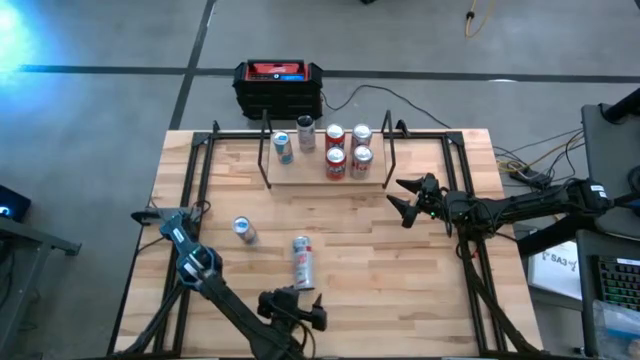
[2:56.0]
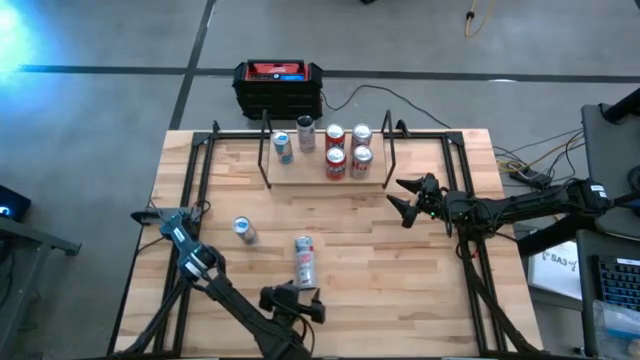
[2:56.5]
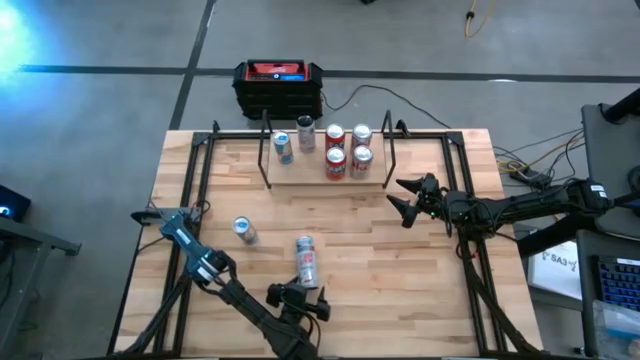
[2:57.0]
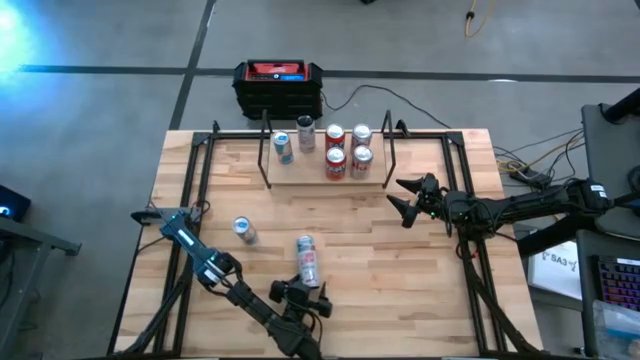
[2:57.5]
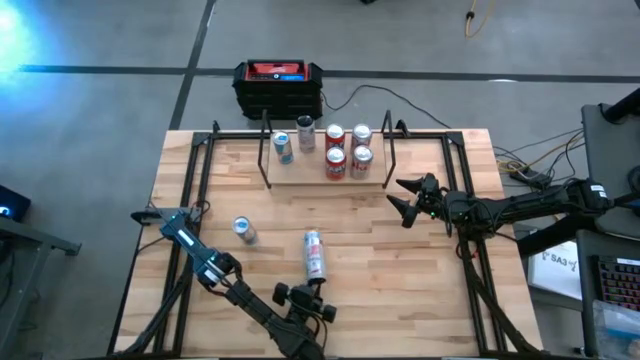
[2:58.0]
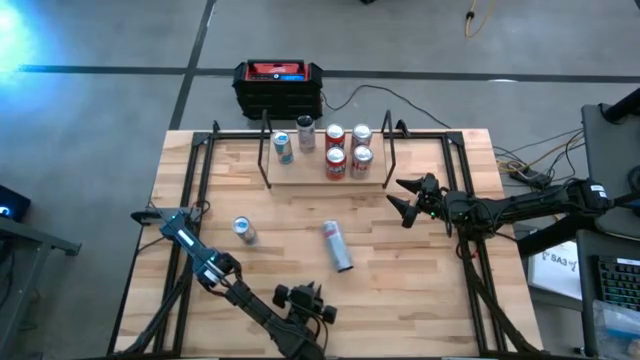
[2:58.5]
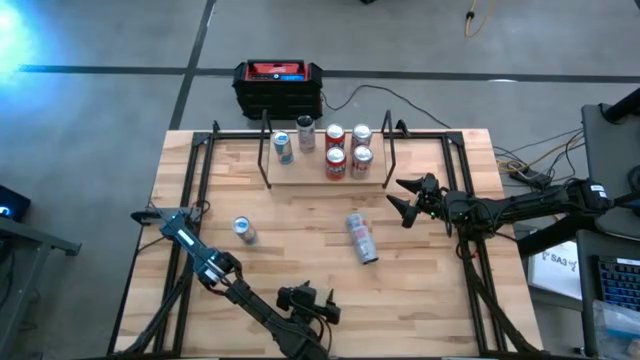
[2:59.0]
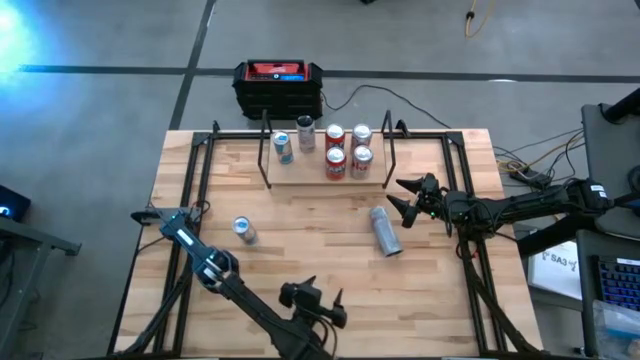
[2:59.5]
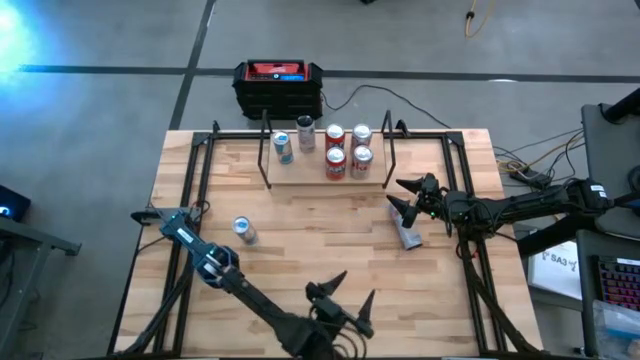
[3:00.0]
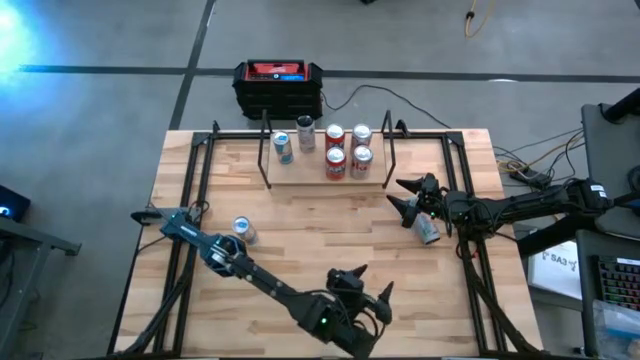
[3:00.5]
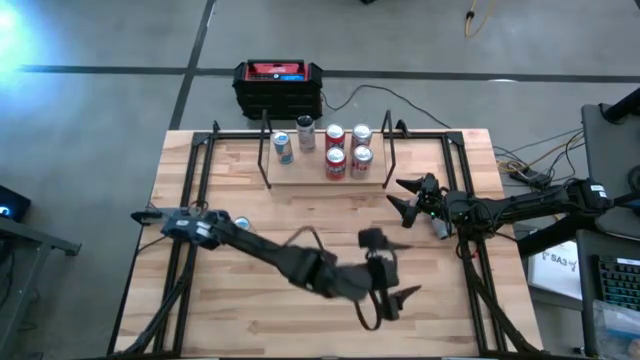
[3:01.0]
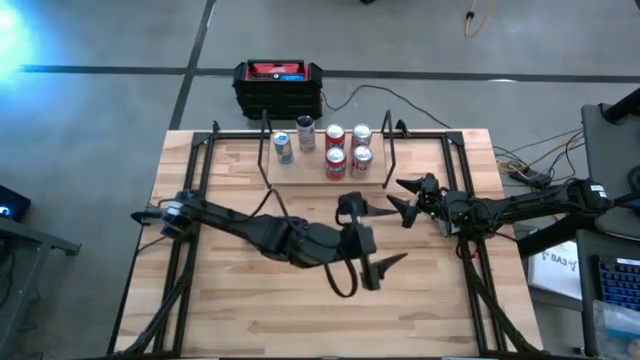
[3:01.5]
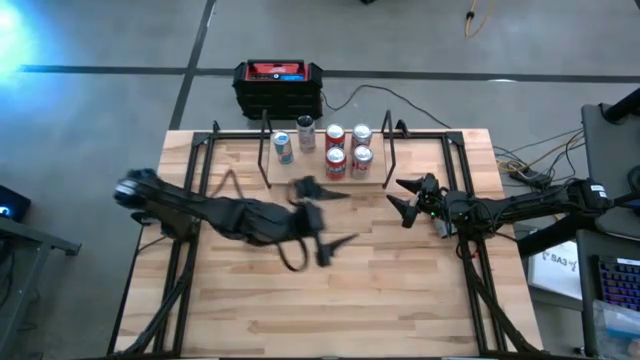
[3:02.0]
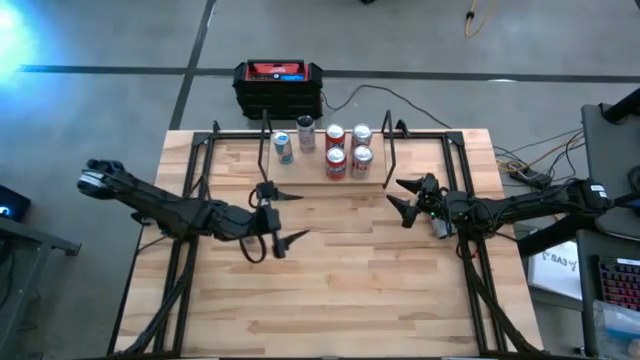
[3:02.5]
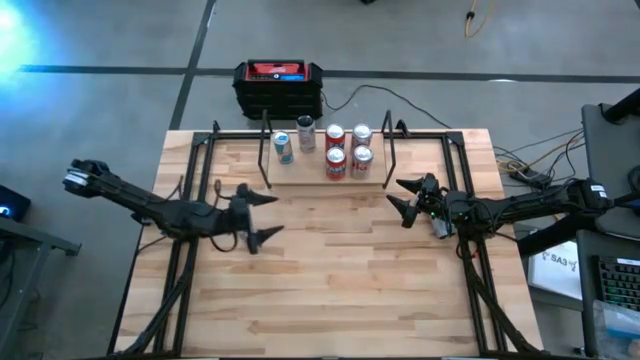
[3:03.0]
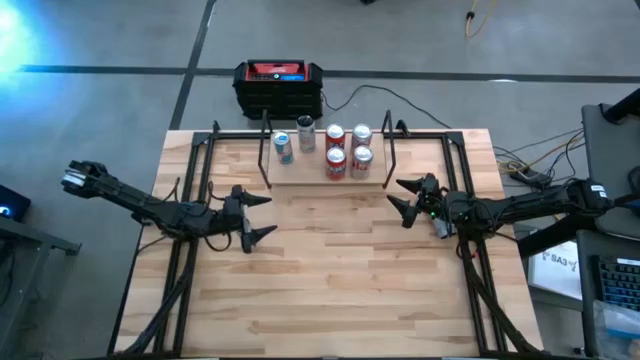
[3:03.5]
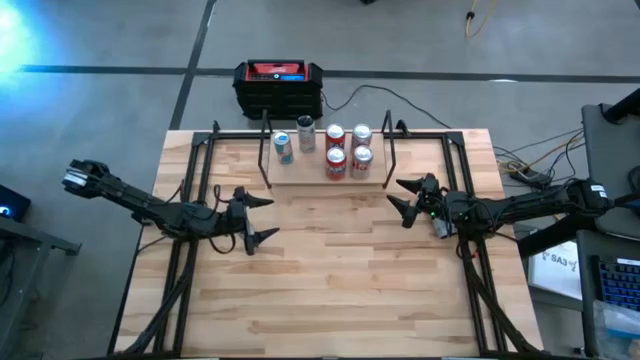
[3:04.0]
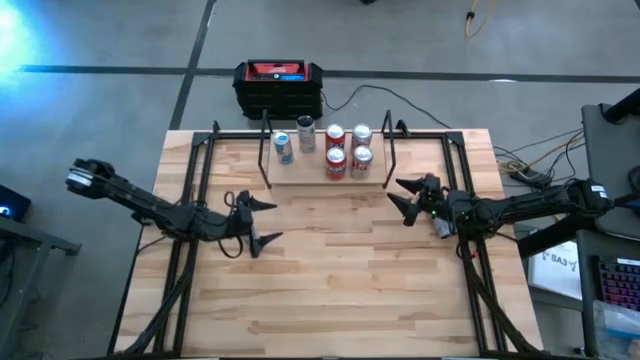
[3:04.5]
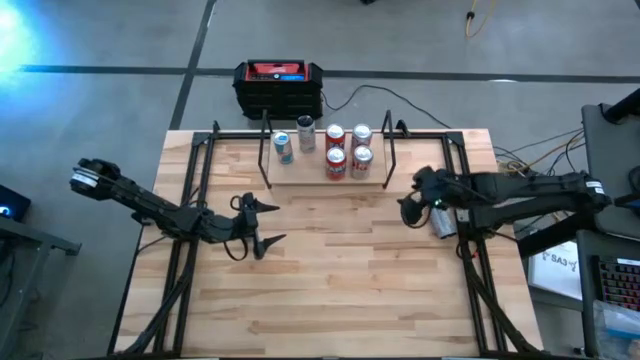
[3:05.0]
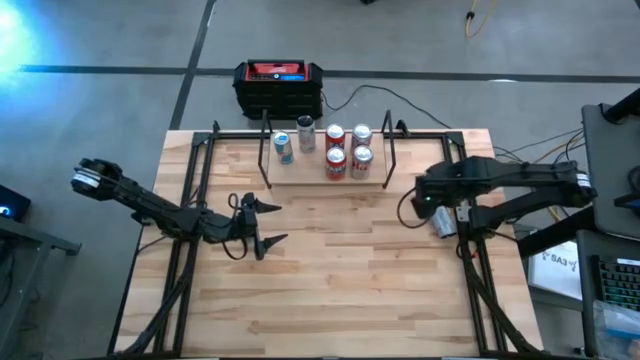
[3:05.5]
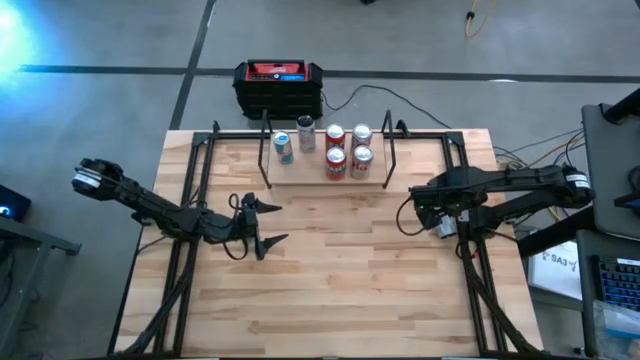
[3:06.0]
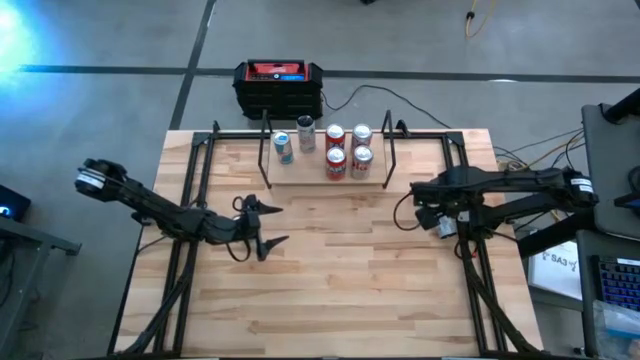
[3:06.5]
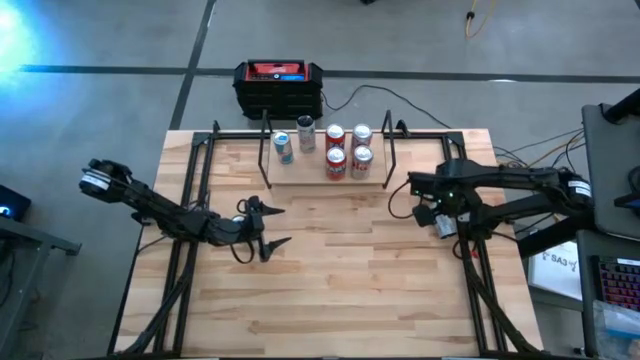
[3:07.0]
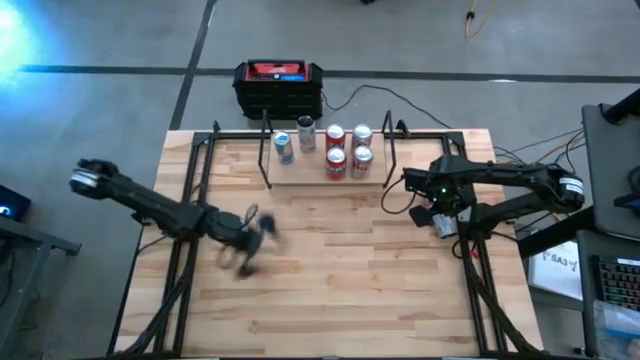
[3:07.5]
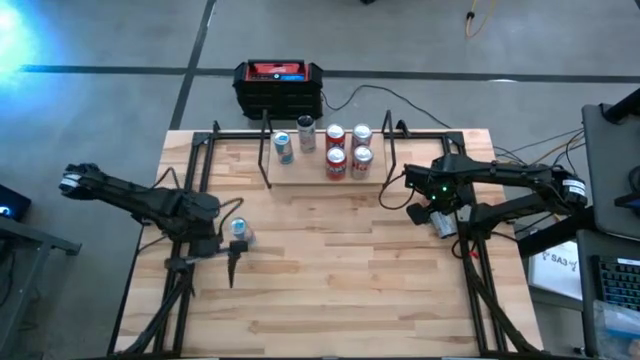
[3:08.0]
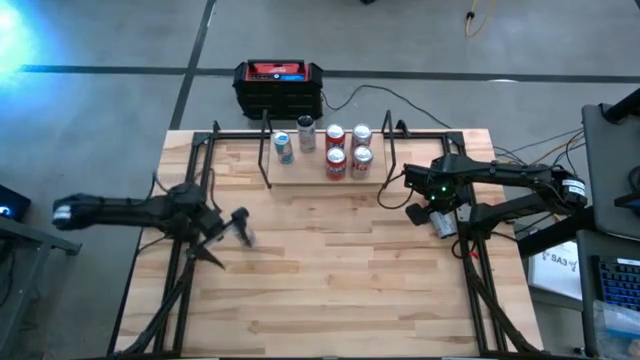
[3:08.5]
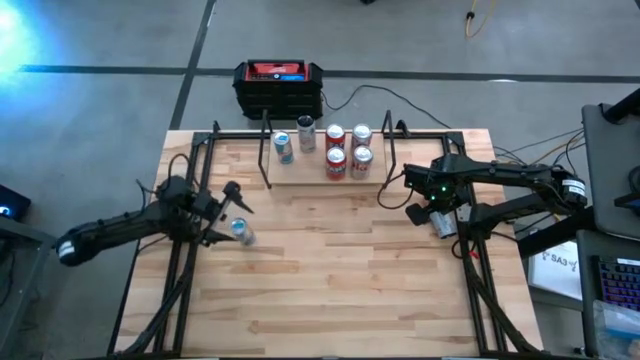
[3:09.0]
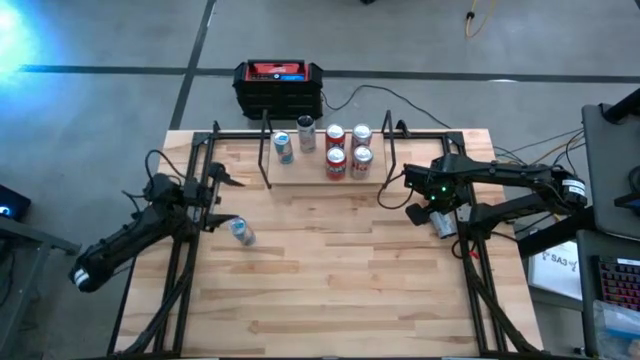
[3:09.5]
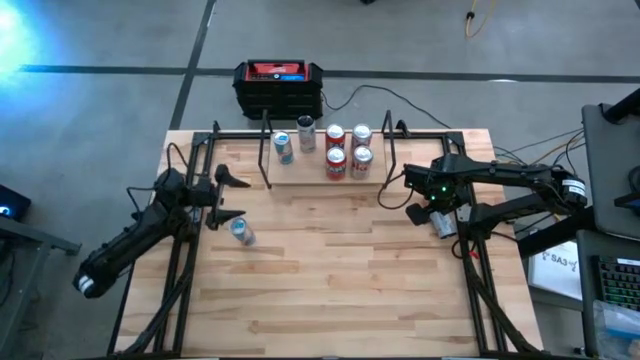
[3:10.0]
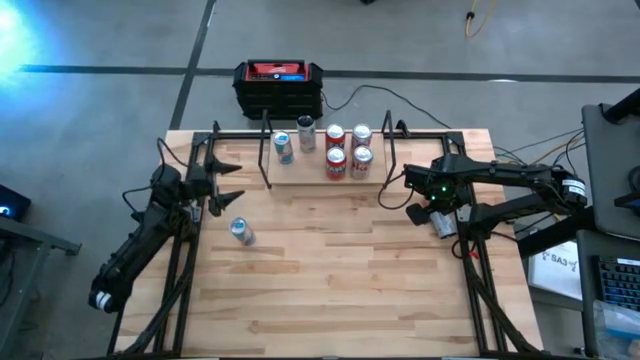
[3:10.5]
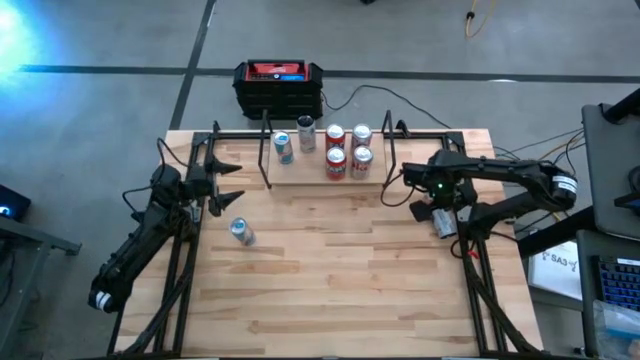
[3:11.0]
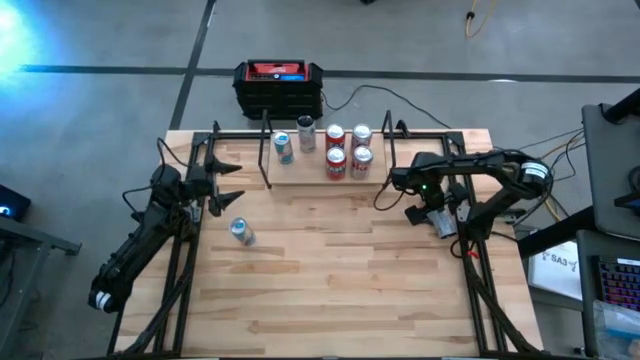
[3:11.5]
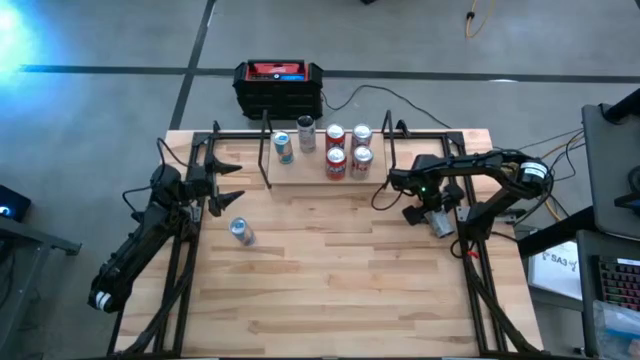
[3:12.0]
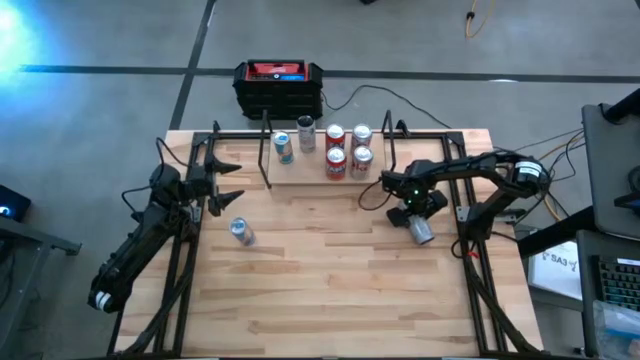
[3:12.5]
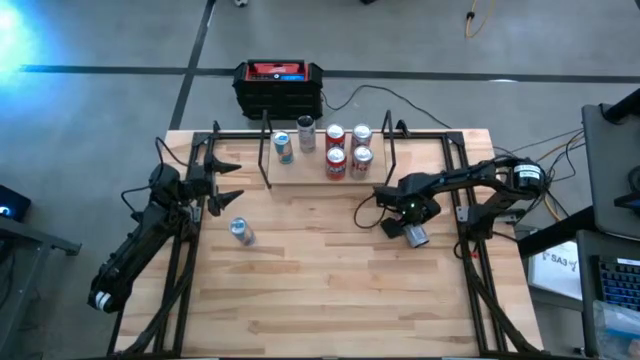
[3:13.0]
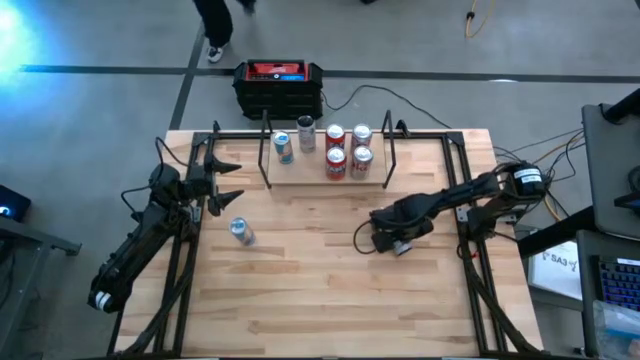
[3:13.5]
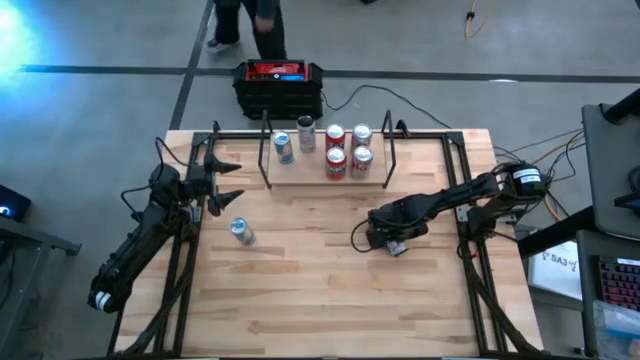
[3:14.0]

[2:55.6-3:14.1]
Task: Place canned beverage on shelf
Put the white and pink soda can on the shelf aligned with the other white and pink soda can

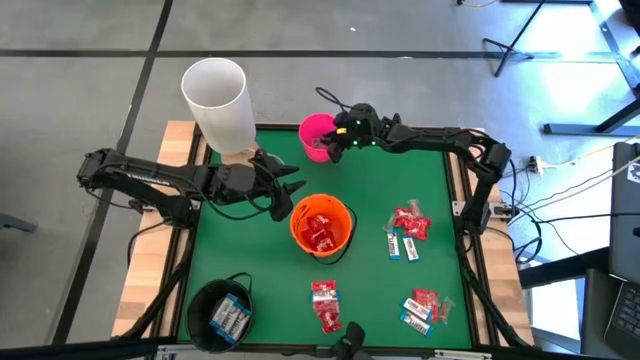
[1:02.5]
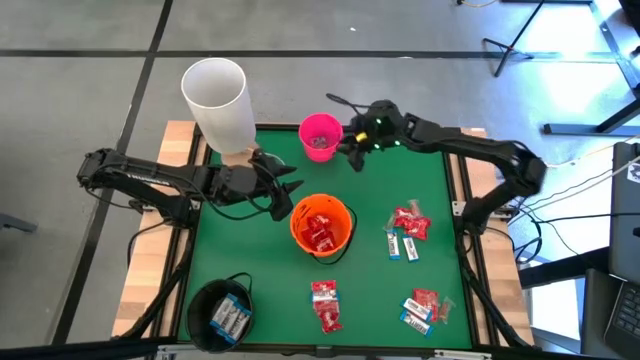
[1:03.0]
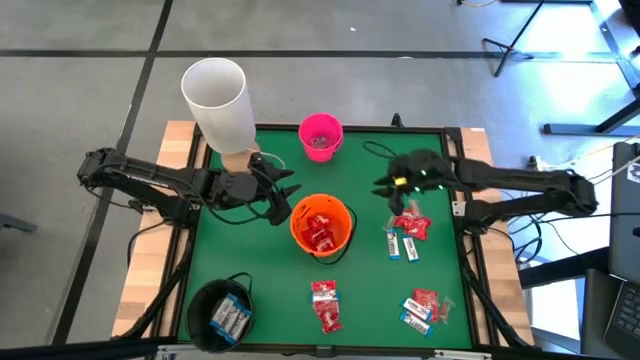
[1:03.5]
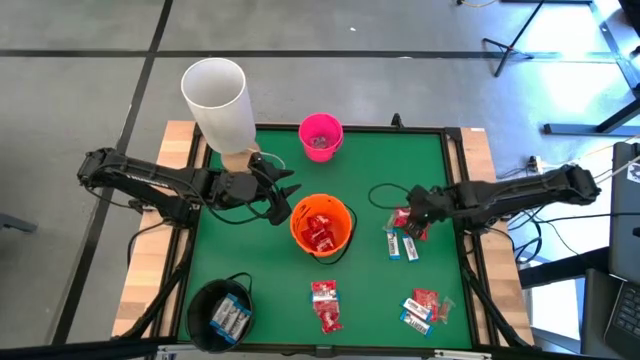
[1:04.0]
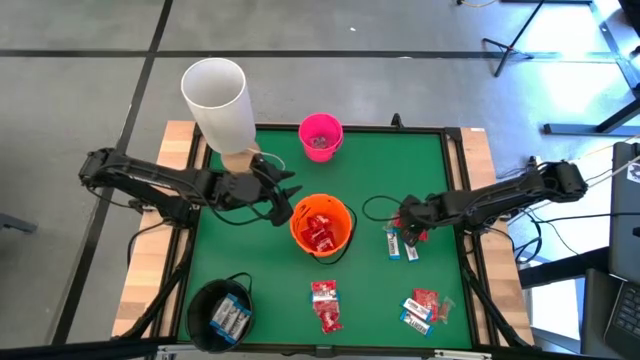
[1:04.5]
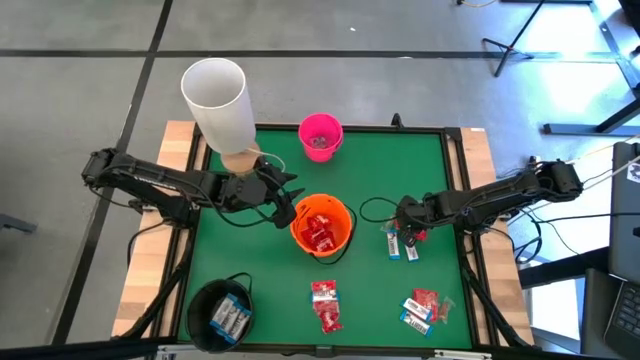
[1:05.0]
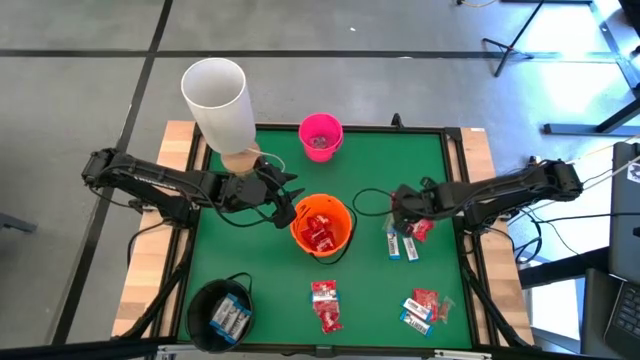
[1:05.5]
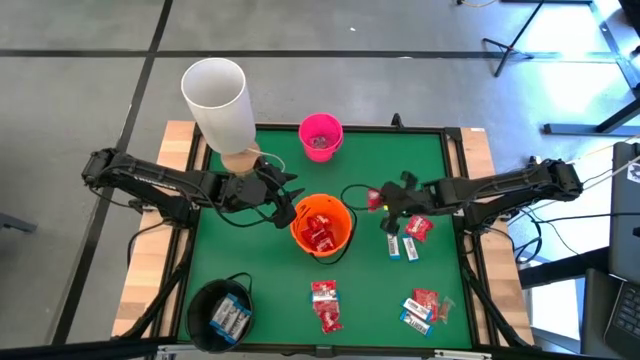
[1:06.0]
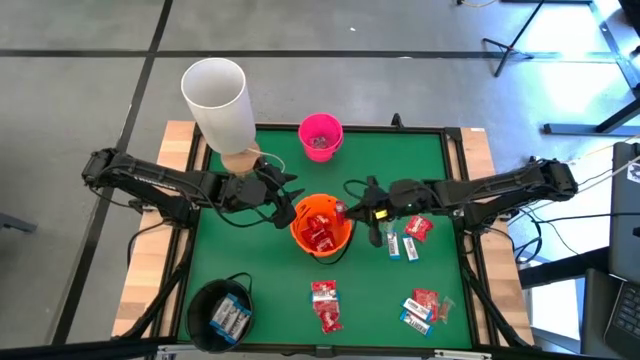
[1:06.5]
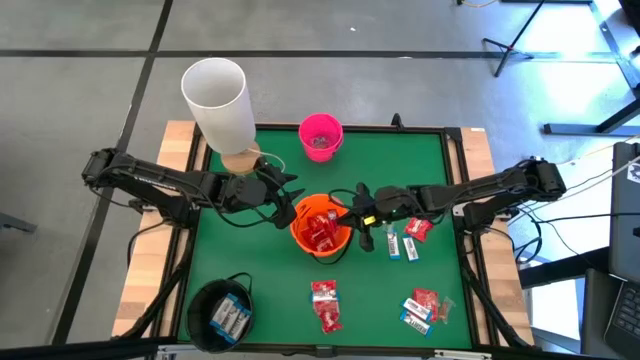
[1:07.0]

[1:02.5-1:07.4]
Task: Sort candy
Put the red candy into the orange bucket
